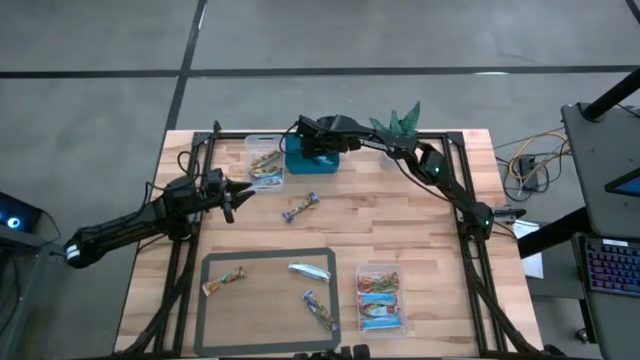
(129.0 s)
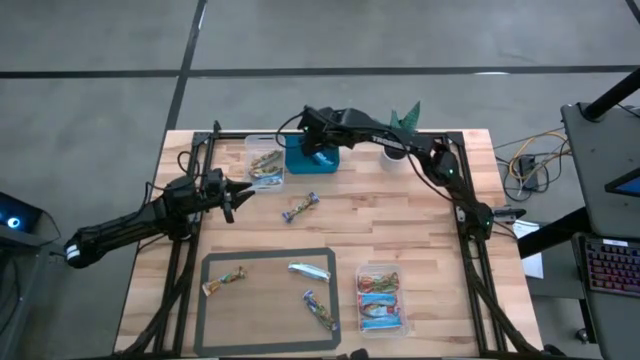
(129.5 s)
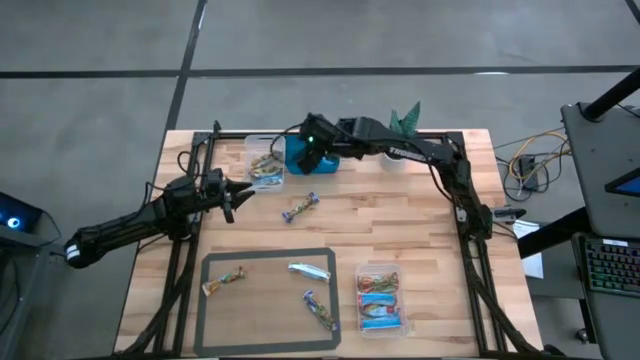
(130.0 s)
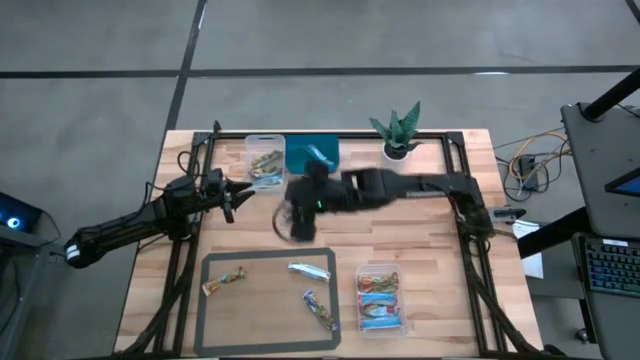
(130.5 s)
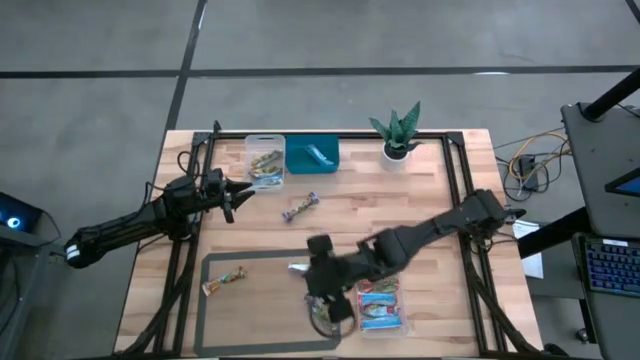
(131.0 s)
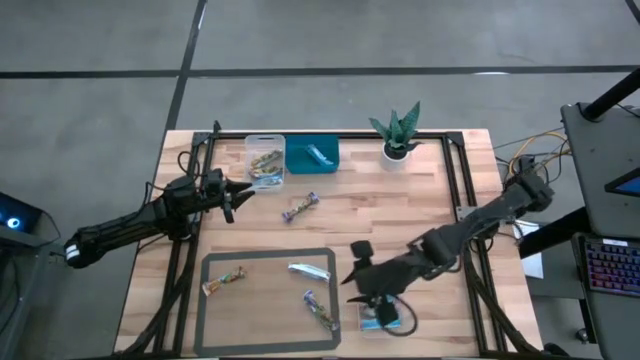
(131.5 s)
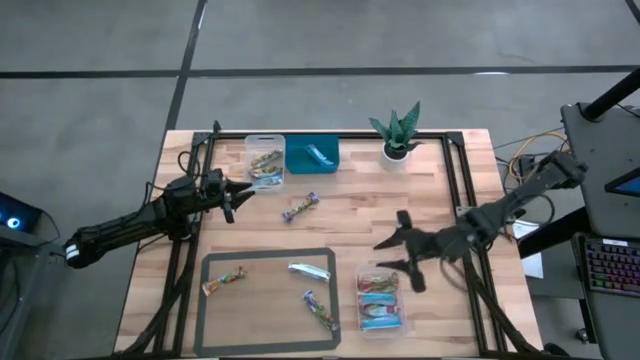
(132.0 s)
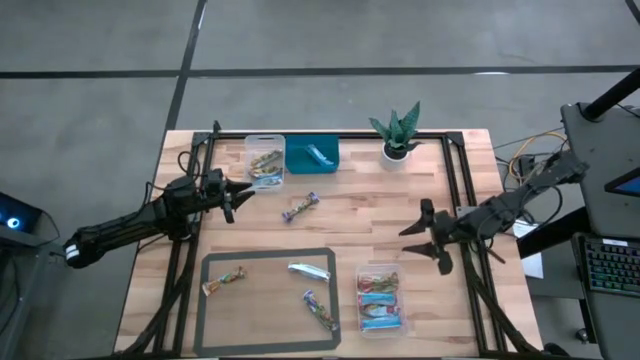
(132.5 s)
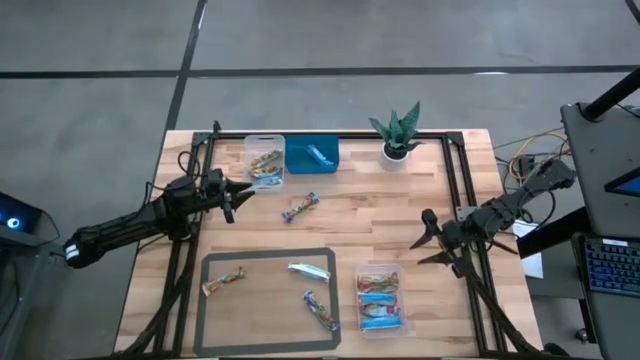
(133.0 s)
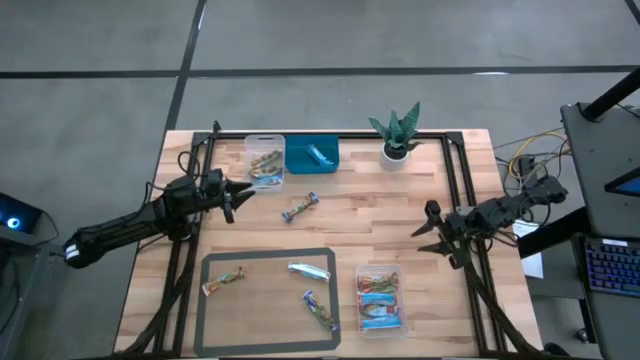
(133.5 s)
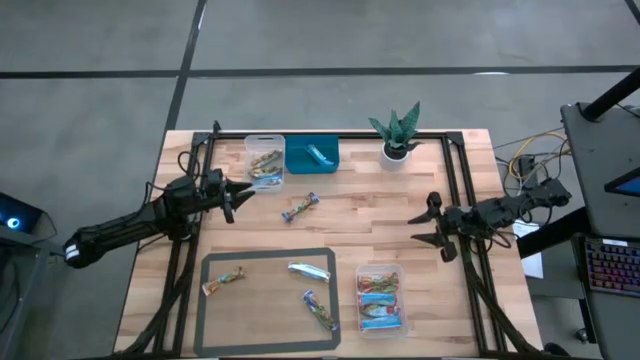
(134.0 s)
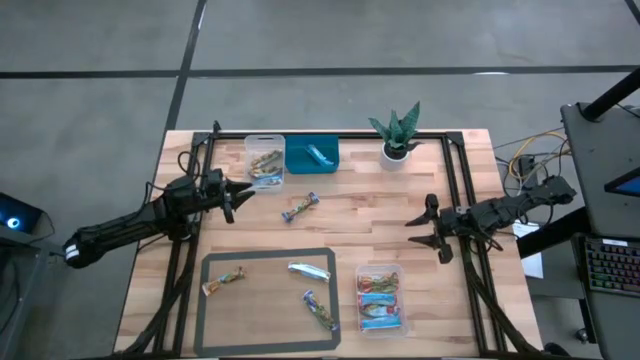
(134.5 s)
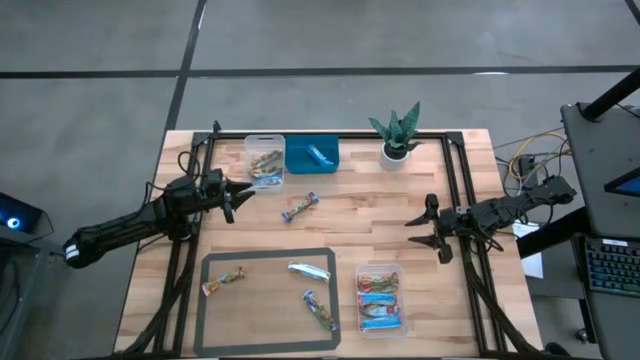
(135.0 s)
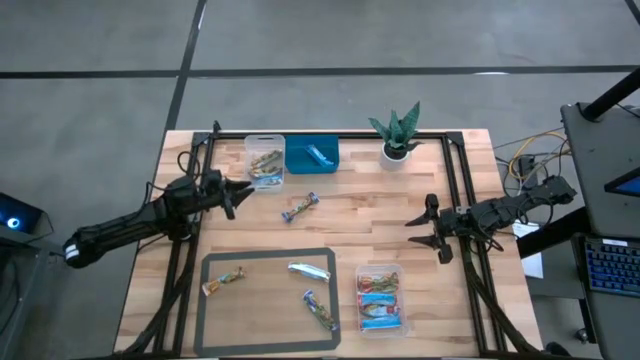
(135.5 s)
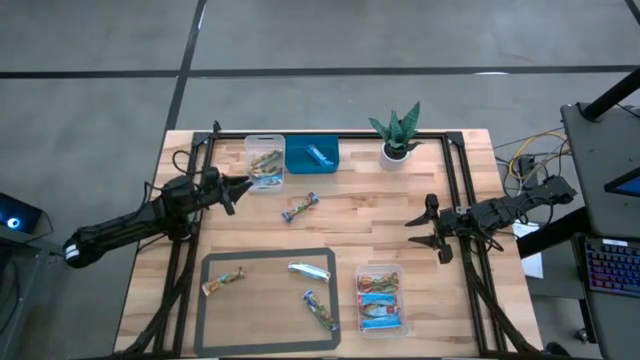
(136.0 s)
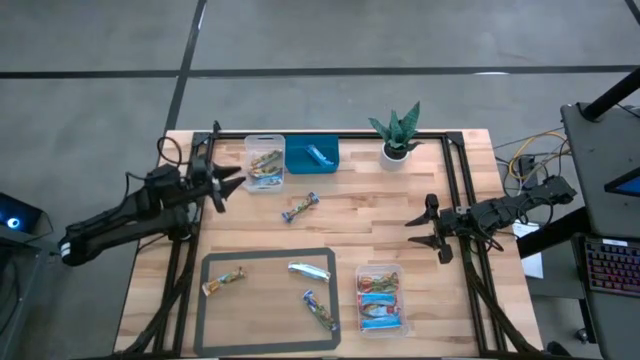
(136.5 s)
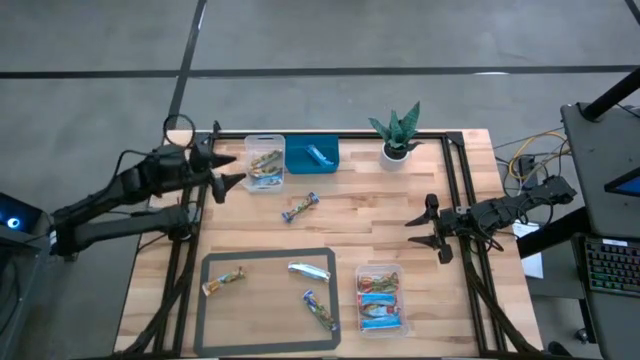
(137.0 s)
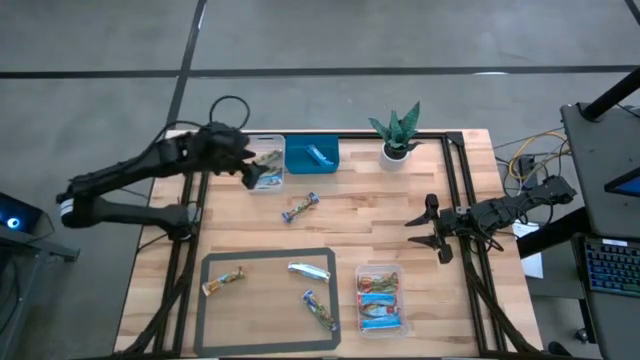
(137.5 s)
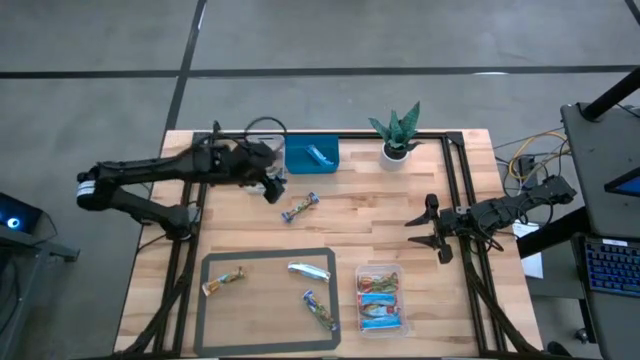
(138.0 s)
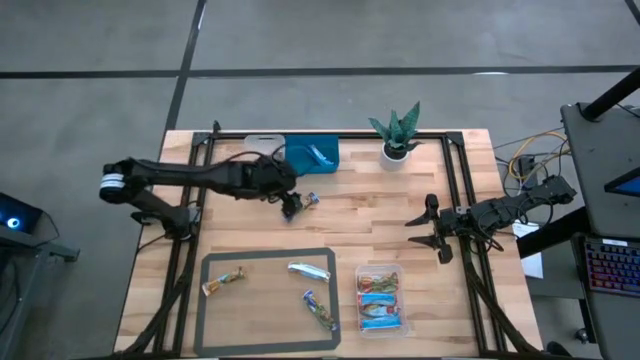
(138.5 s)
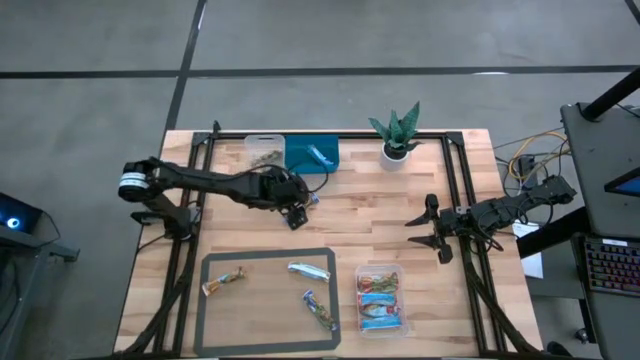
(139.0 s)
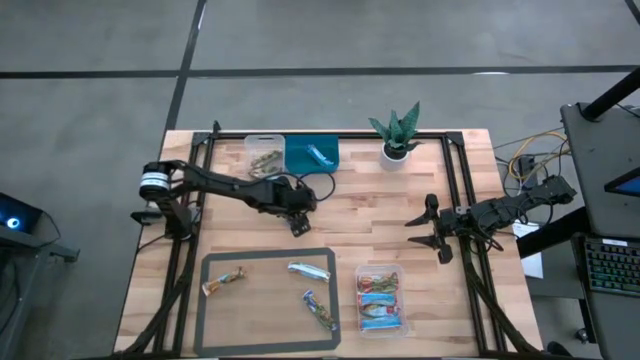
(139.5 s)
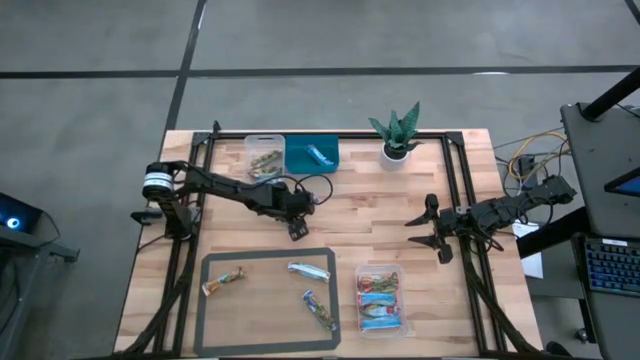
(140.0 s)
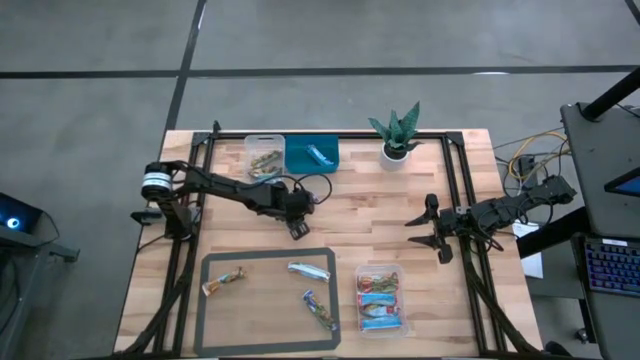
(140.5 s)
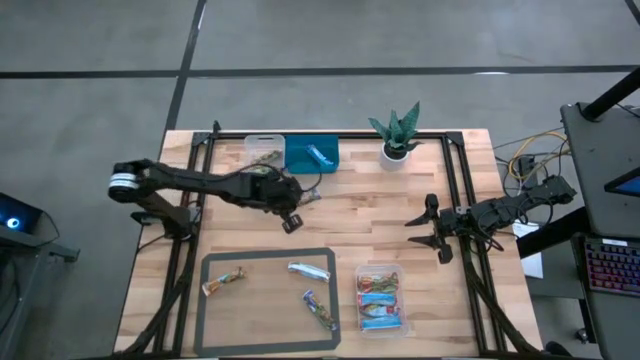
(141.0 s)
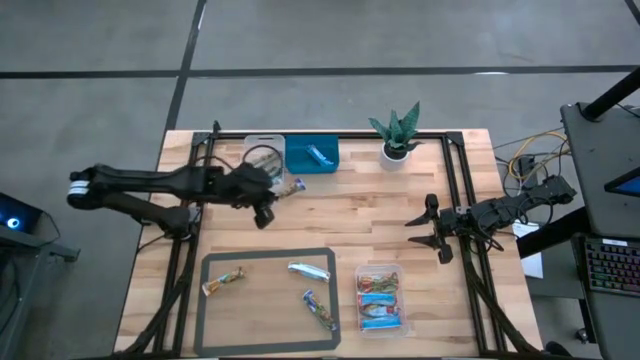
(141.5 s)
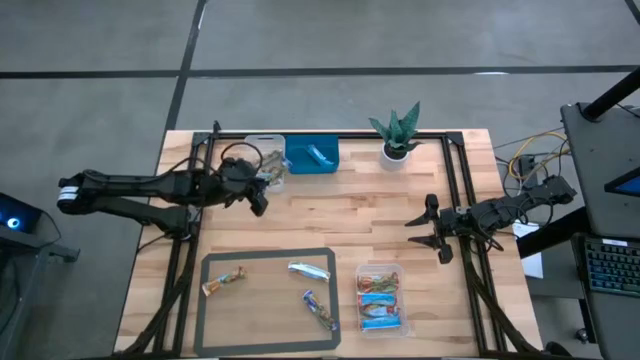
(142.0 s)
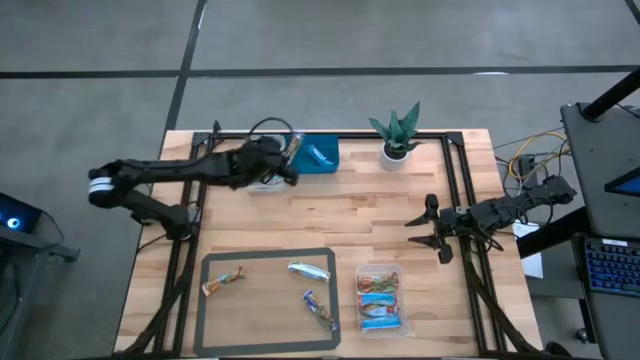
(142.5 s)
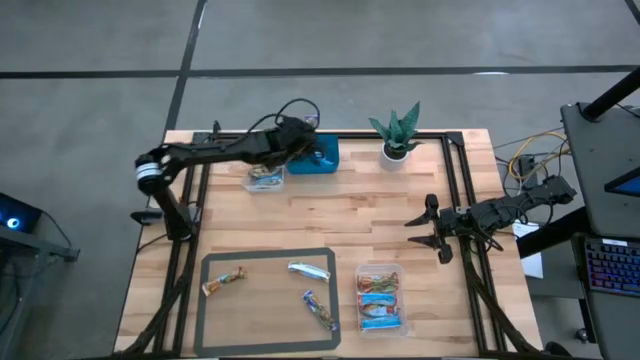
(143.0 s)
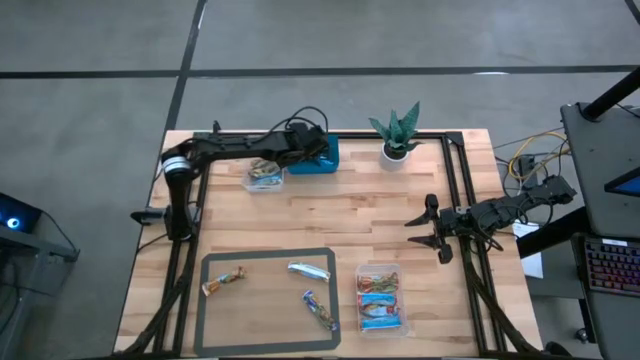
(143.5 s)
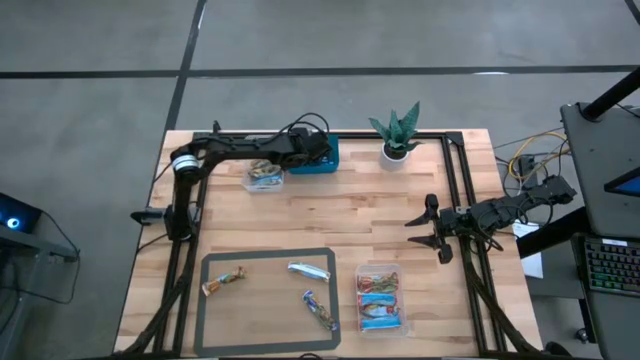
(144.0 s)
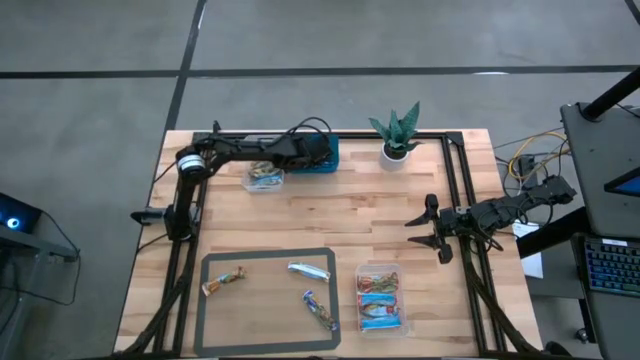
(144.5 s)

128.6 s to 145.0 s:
Task: Pick and place Granola Bars by type
Put the blue granola bar into the blue bin

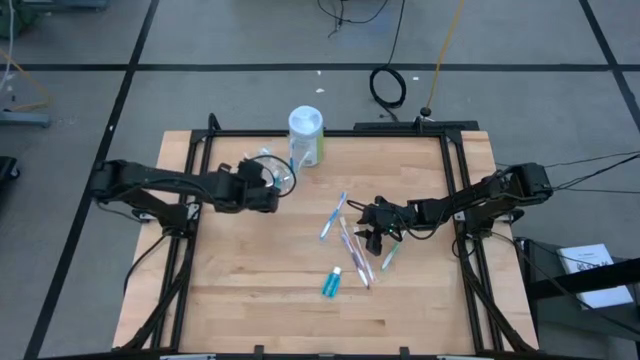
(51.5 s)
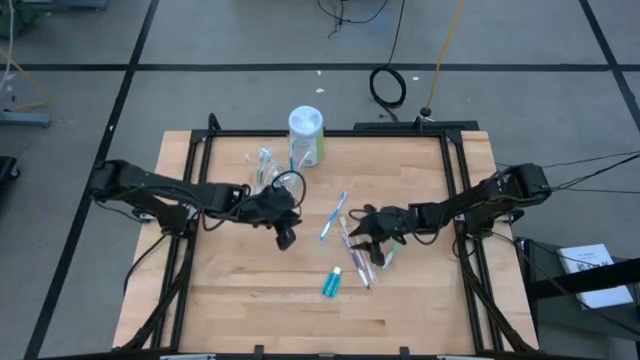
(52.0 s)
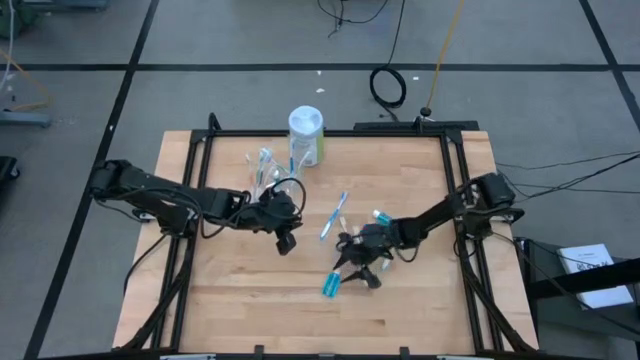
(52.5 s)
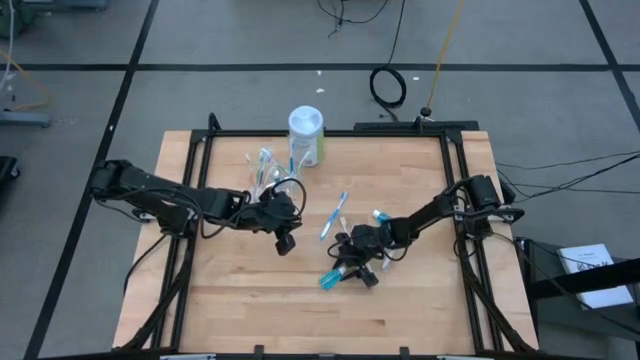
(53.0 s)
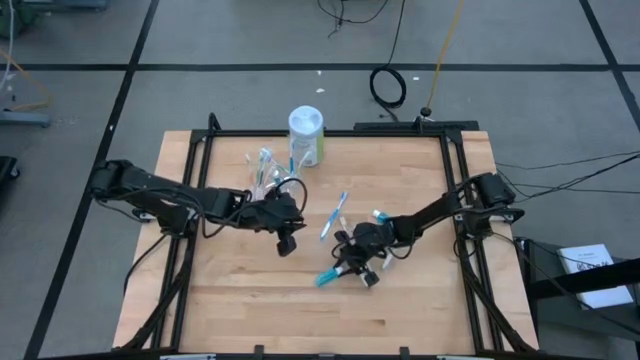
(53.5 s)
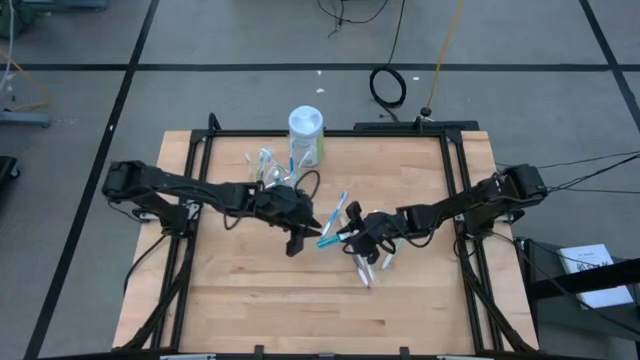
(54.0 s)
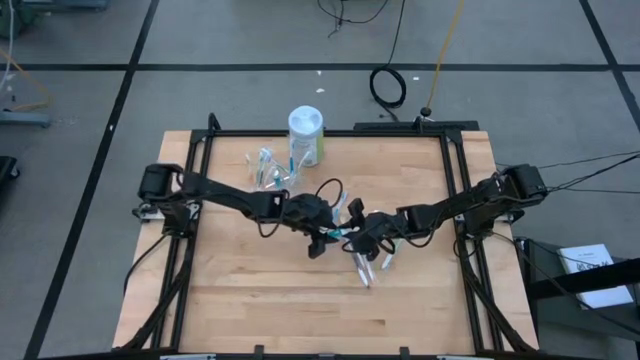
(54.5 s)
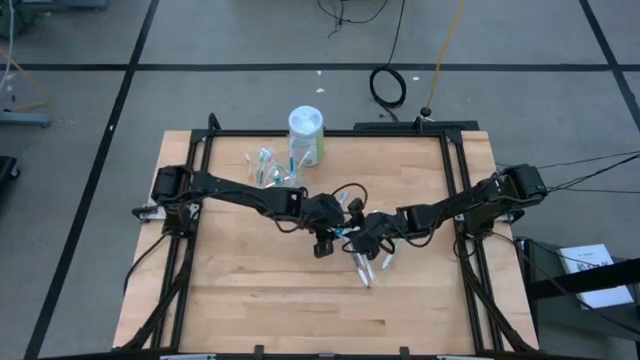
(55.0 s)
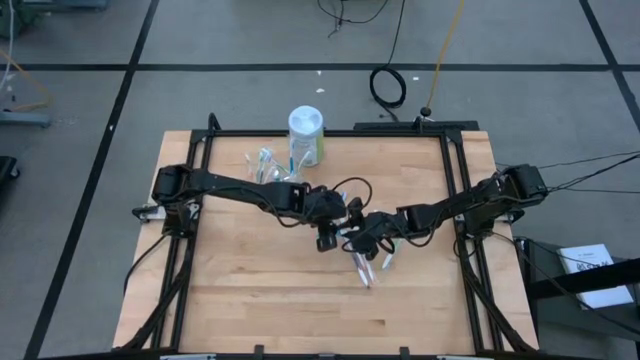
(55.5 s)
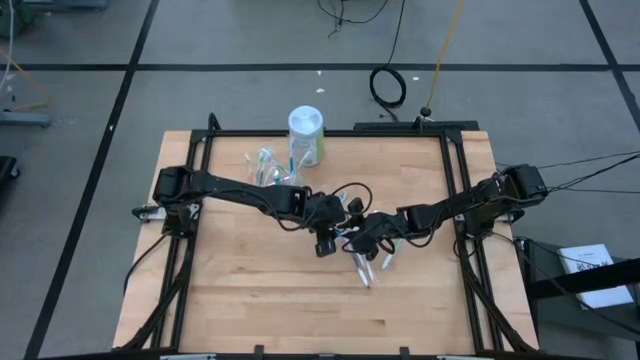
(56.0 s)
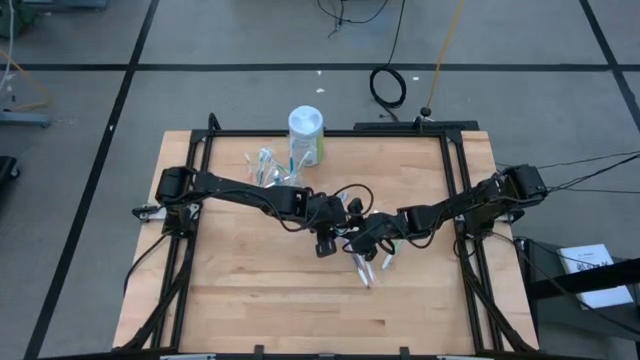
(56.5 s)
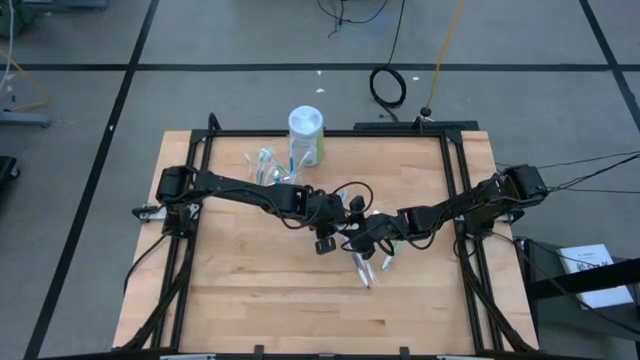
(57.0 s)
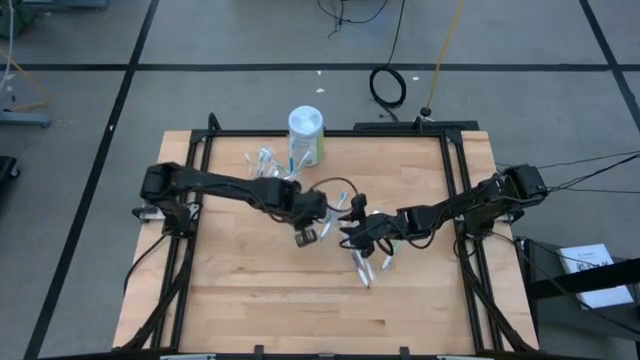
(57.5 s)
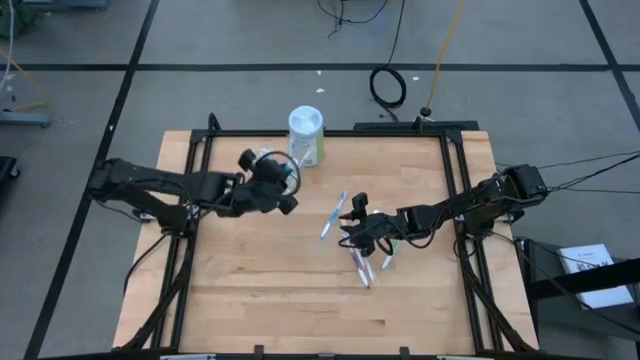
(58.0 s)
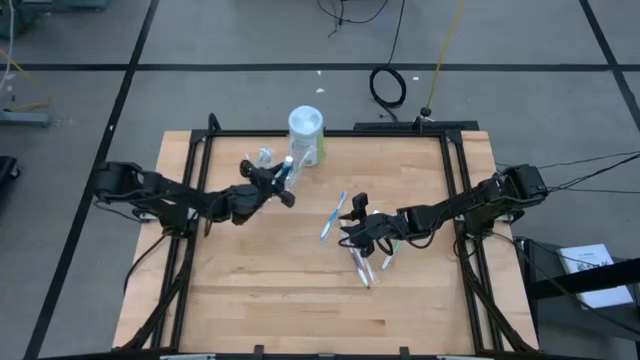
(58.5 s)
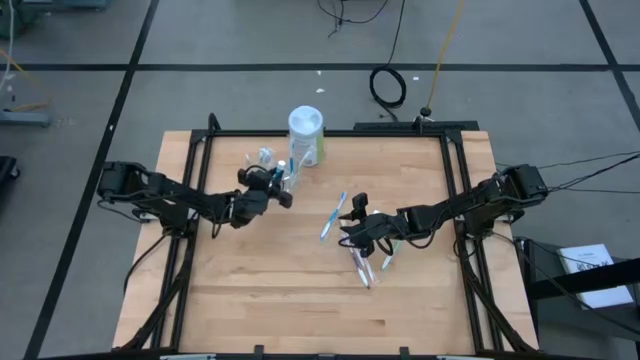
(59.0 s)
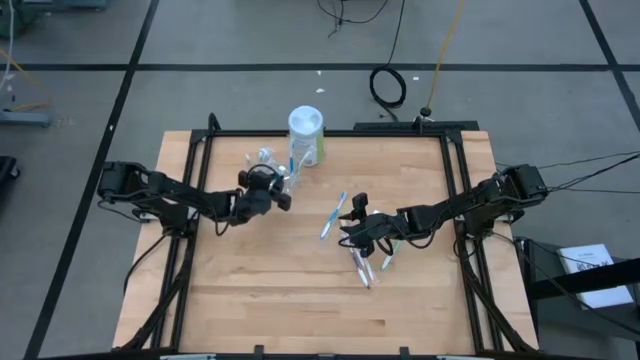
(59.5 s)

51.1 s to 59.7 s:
Task: Pick & Place toothbrushing station
Put the bottom blue mouthwash into the transparent organizer
